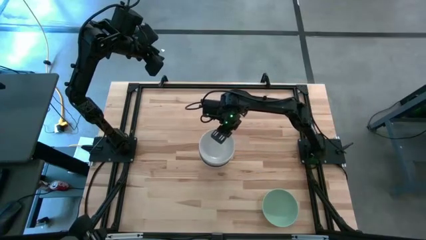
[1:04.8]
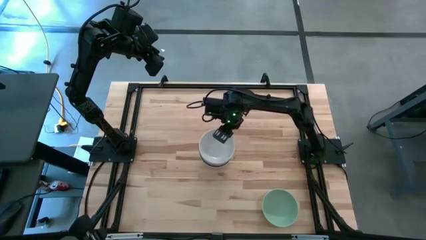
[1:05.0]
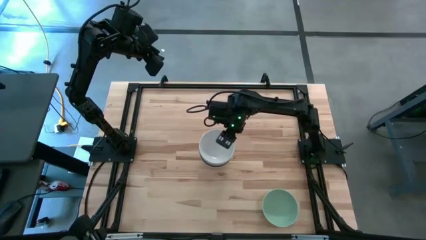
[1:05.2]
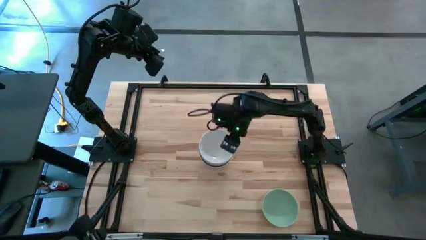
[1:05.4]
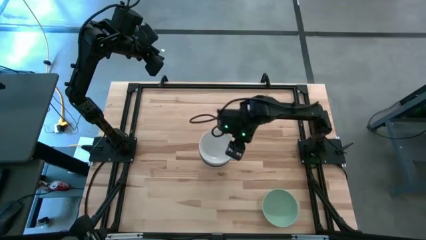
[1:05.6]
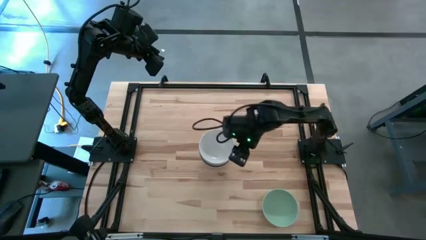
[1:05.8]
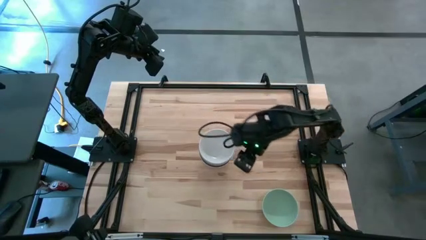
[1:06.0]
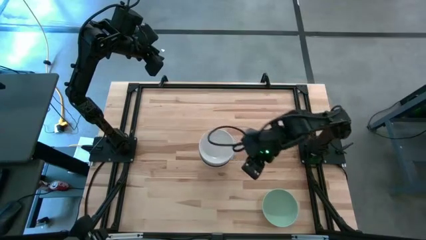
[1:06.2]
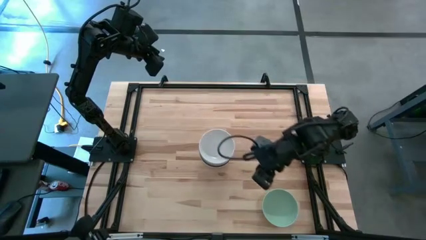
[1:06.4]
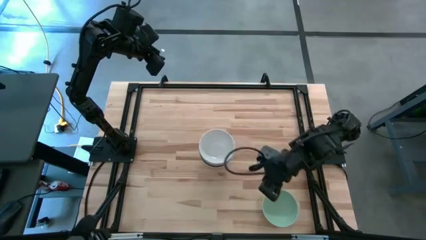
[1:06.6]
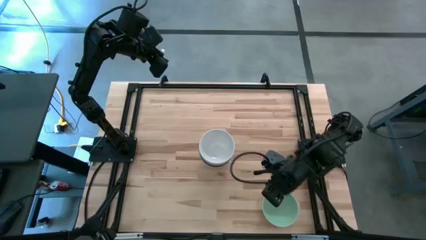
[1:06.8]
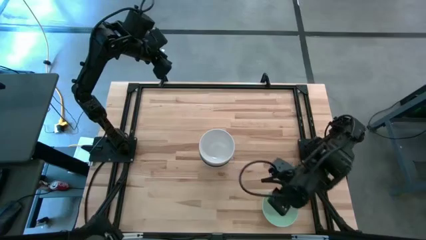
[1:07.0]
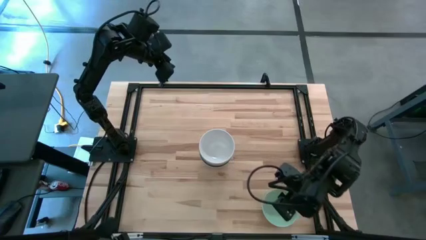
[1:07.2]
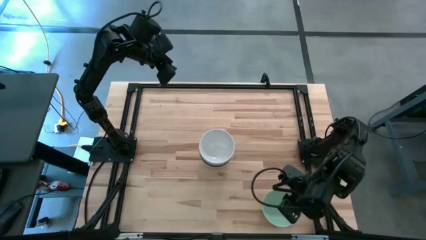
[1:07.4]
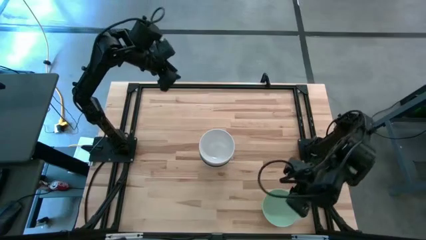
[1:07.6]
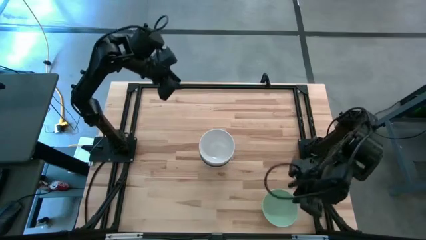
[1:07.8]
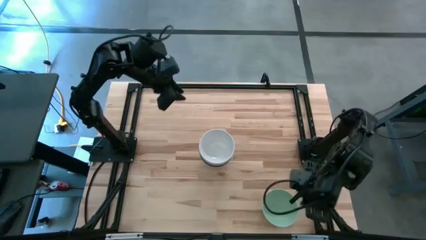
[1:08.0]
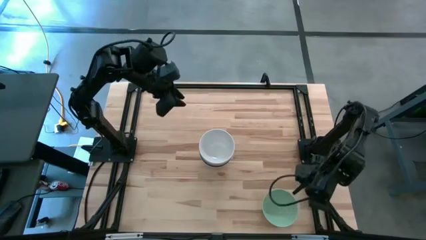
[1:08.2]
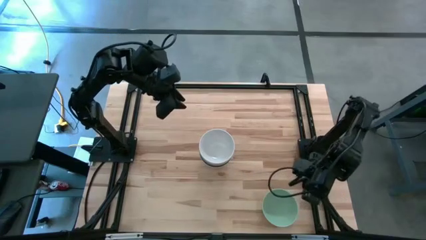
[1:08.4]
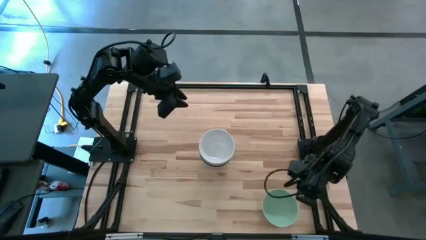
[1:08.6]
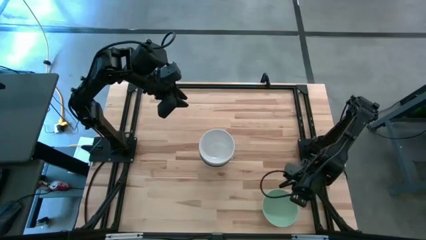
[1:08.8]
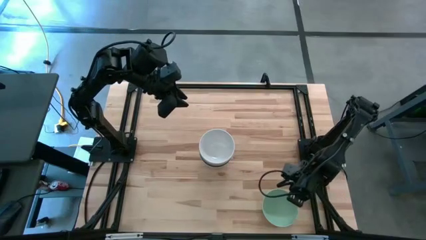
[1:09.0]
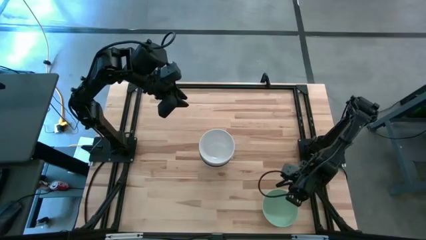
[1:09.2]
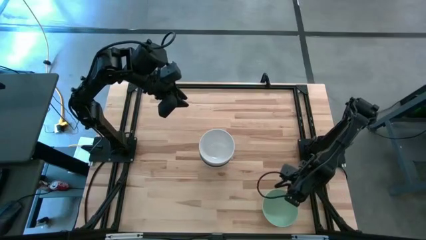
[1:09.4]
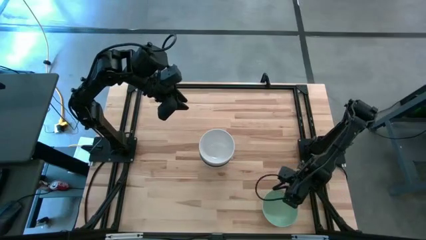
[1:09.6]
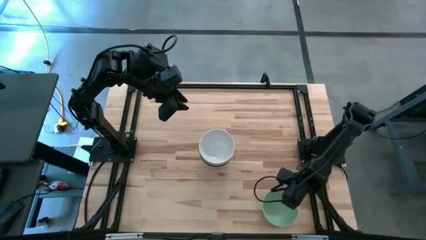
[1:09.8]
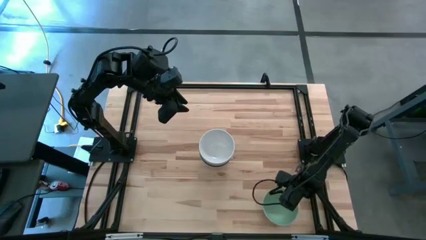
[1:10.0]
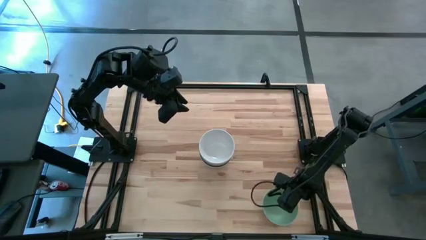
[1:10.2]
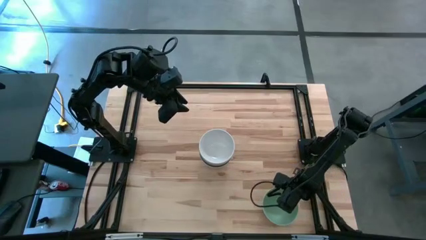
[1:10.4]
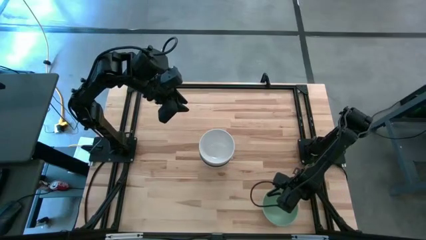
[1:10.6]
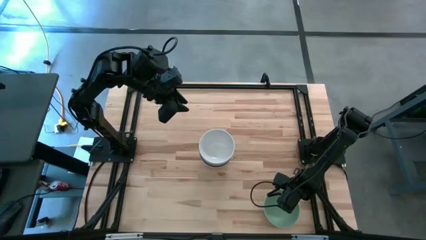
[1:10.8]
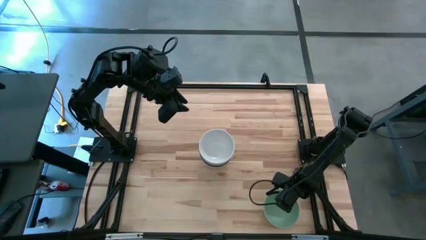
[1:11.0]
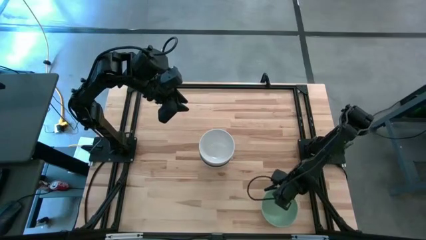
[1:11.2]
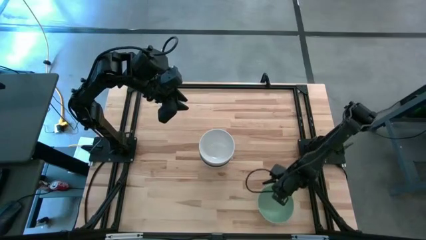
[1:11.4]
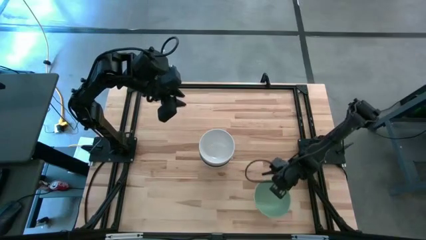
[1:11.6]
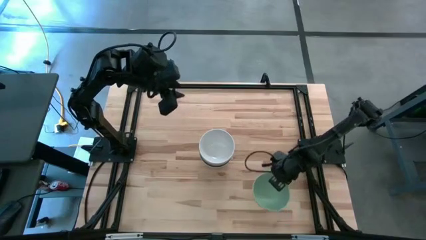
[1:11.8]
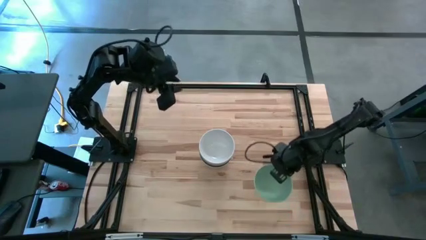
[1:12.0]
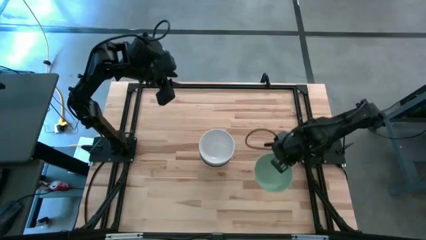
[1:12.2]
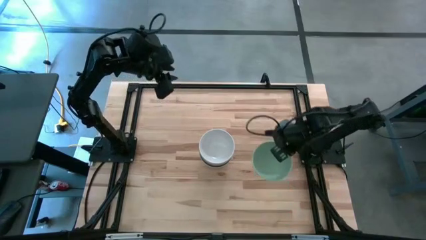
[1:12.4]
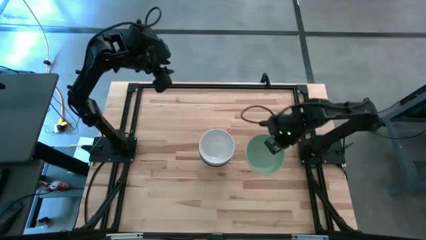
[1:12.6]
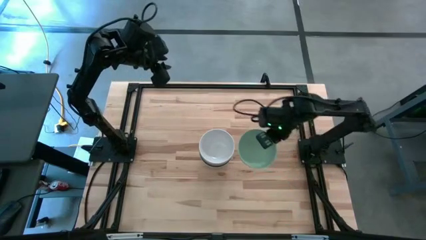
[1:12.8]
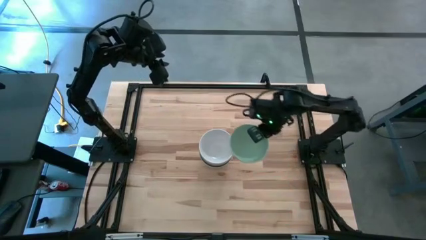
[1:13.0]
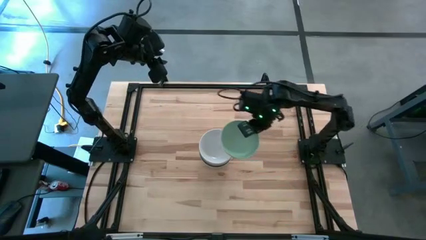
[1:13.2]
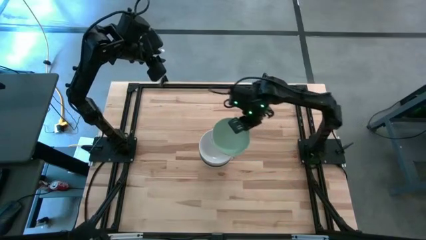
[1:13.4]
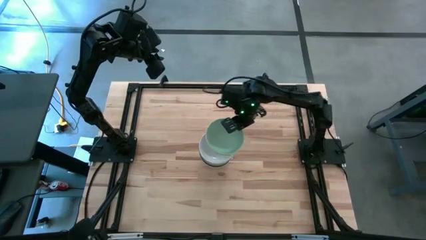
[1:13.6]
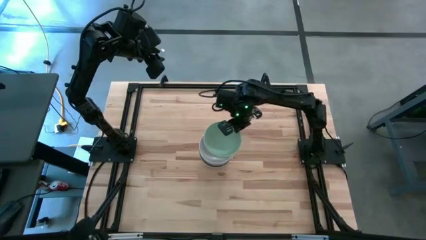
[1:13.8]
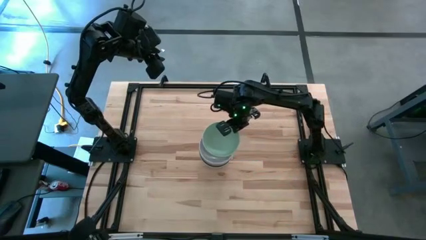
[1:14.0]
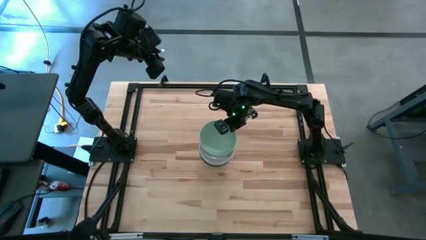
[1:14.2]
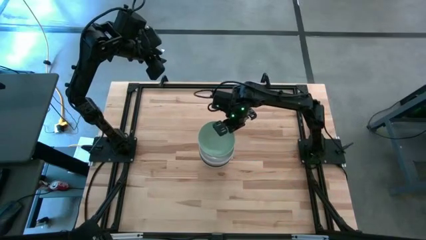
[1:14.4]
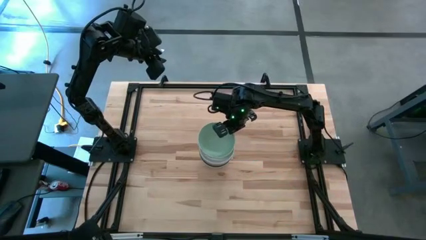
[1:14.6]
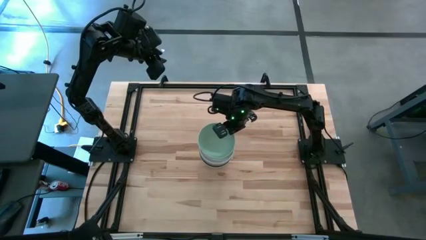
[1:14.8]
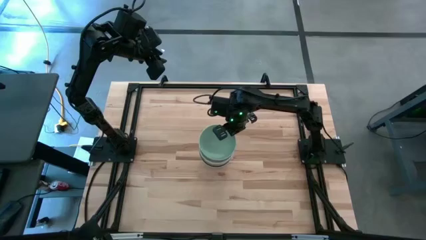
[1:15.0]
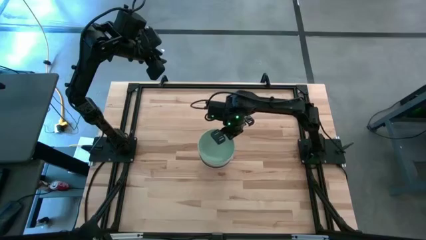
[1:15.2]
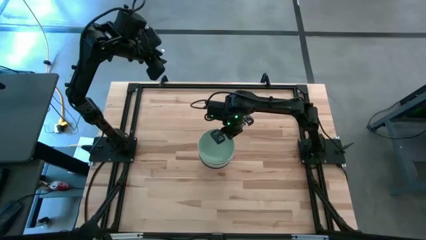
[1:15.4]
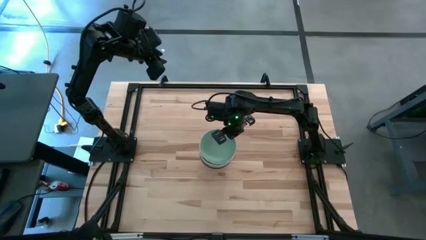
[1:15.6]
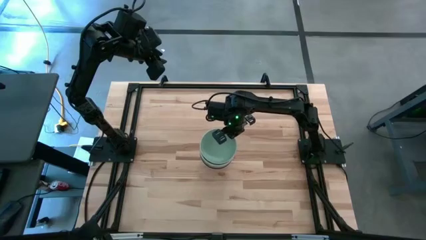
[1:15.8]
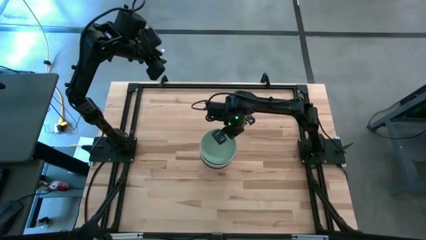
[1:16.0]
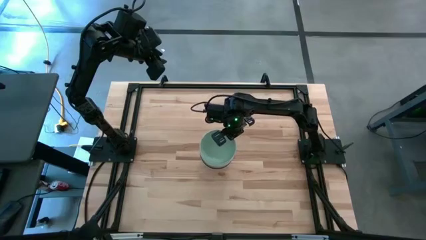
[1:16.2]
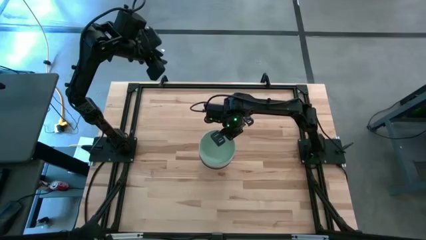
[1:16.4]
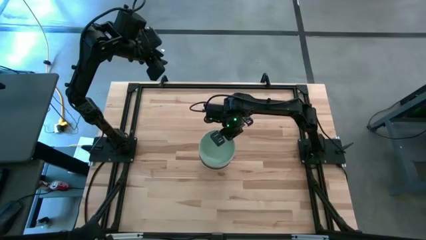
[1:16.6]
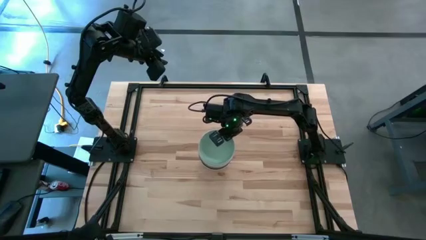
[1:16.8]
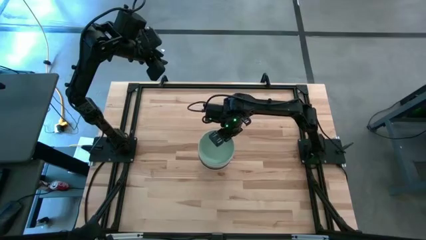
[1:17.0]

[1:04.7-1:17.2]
Task: Nest bowls inside each other
Stack the green bowl on the white bowl

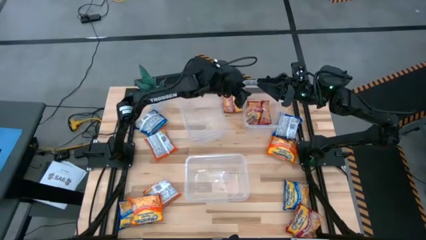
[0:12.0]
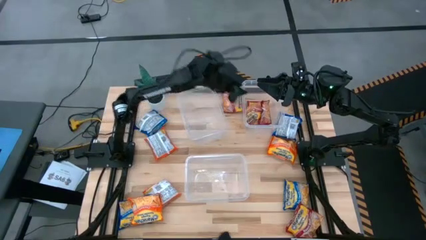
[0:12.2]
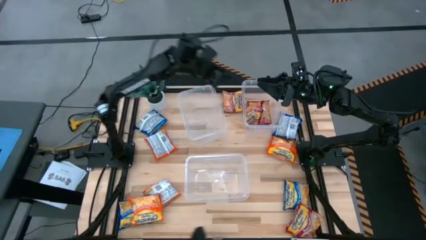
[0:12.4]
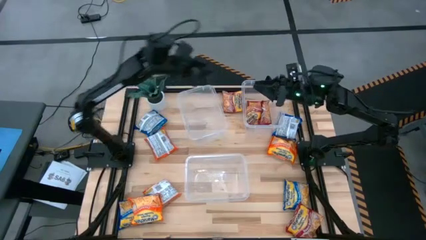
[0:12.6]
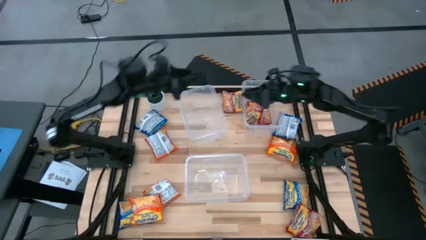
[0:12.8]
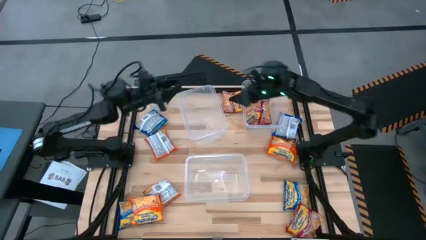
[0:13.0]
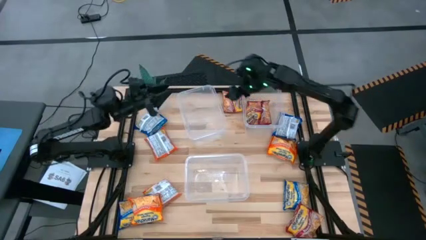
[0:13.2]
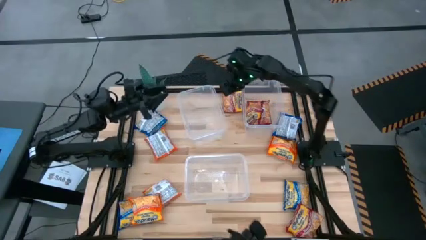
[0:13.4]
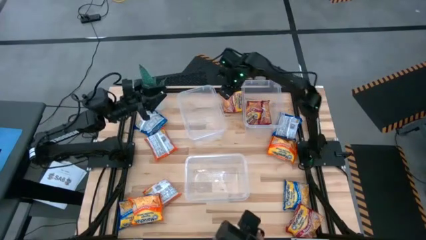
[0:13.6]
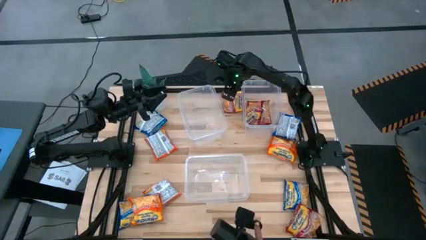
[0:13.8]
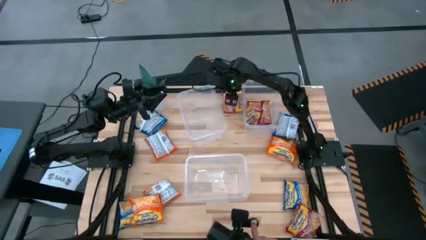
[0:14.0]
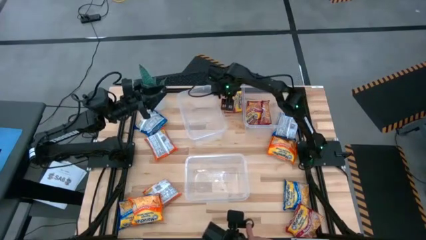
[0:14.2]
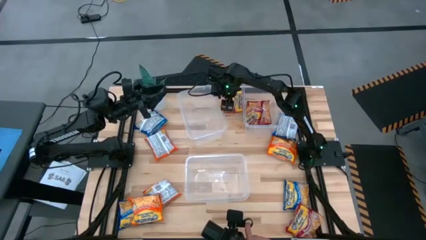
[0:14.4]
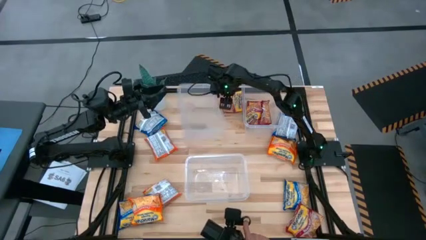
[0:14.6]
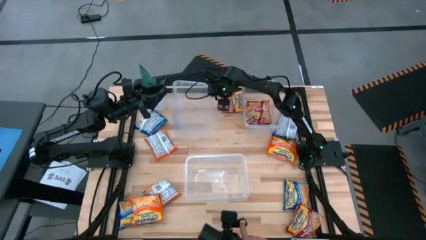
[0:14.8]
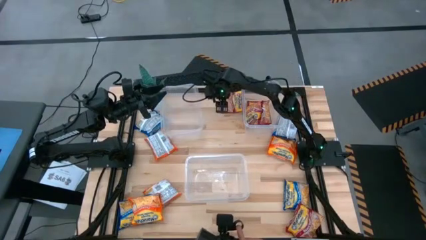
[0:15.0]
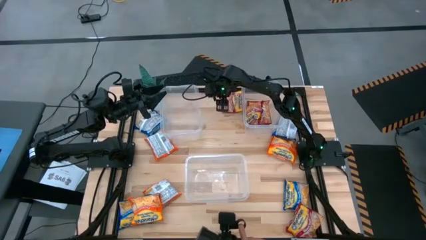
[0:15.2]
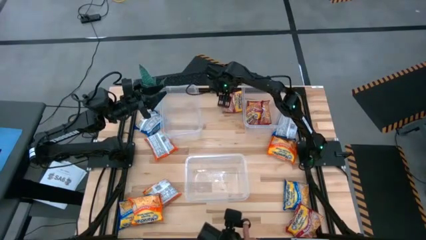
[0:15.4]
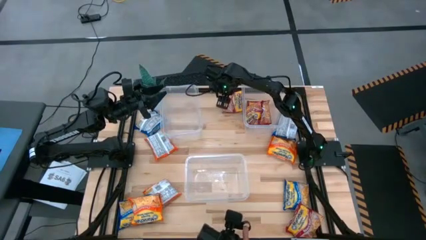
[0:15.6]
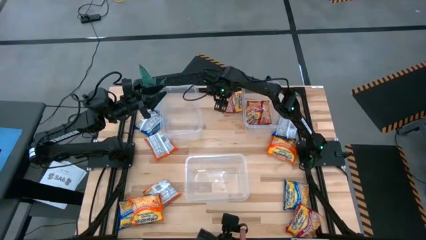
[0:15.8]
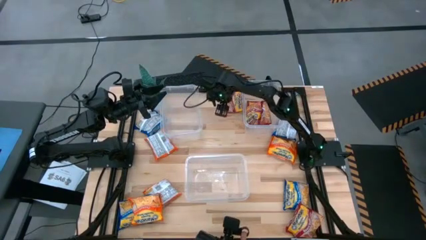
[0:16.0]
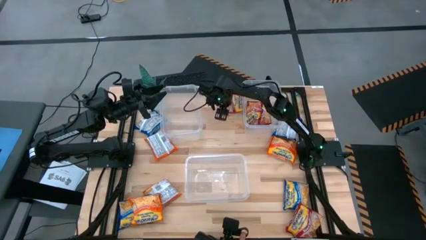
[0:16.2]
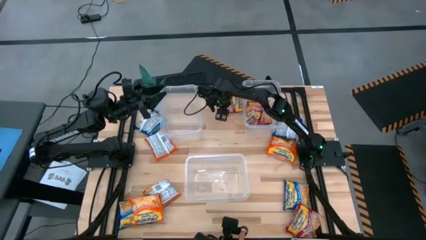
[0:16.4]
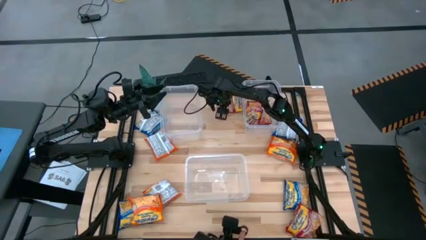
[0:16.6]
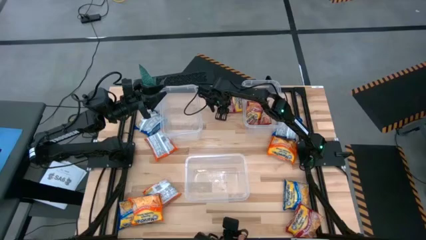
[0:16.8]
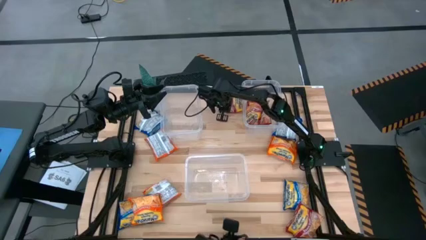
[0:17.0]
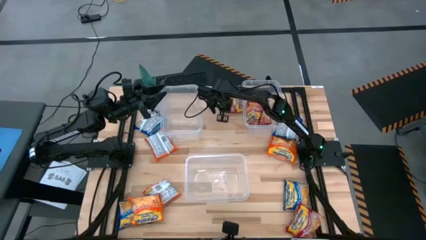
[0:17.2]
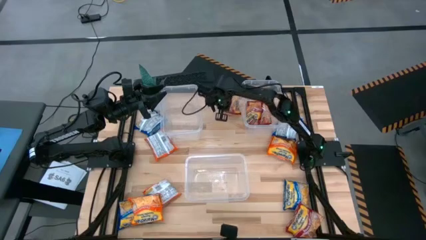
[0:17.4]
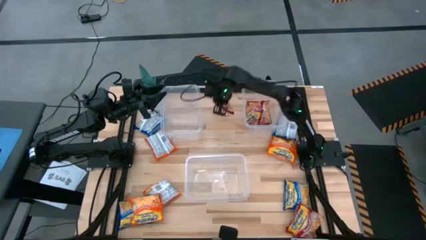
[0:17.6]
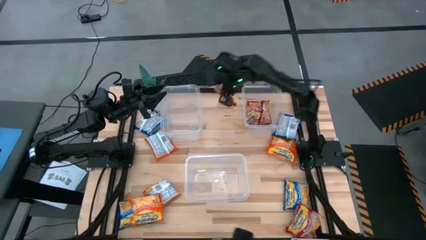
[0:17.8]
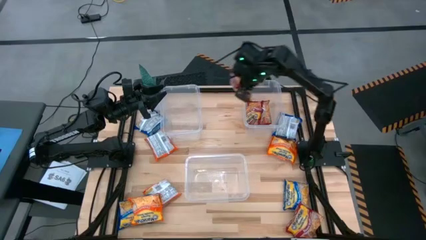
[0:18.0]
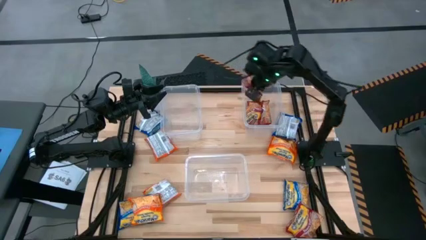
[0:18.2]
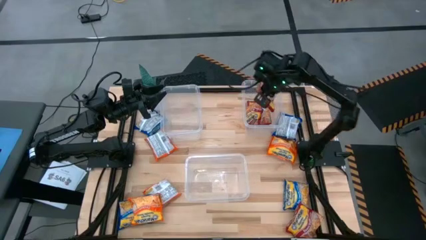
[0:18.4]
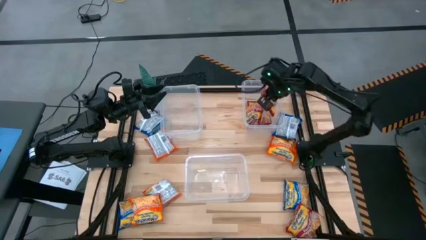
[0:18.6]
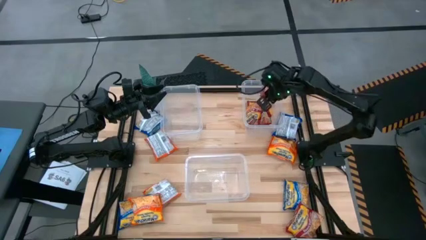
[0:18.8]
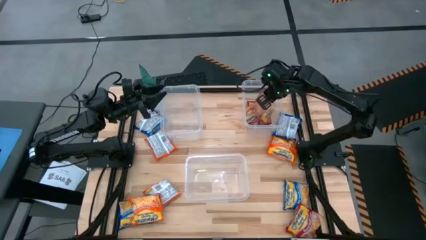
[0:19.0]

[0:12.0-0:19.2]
Task: Sort Maruchan noodles
Put the top red bag into the top right transparent bin
